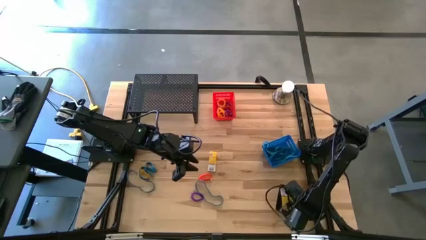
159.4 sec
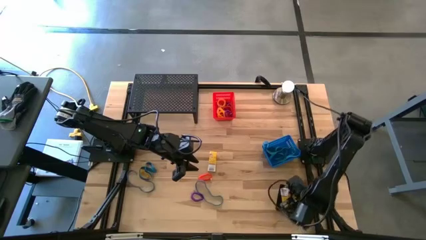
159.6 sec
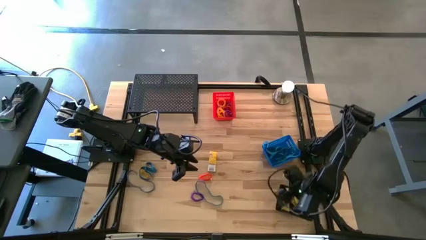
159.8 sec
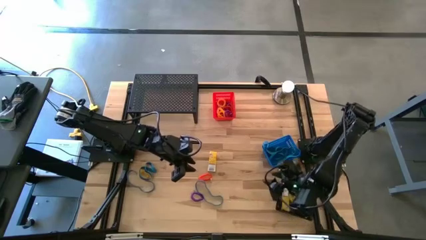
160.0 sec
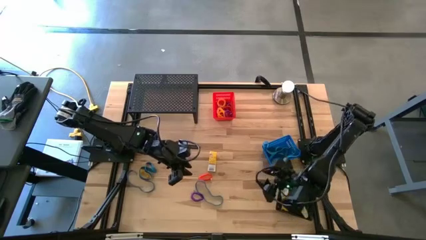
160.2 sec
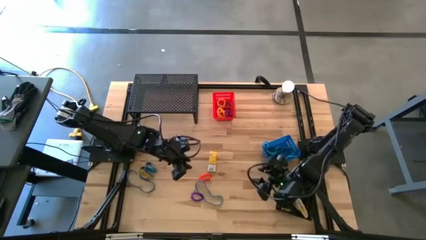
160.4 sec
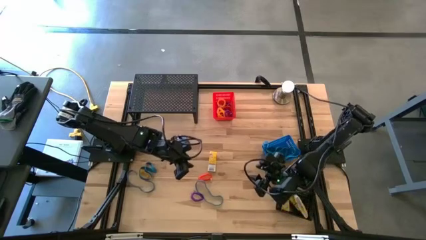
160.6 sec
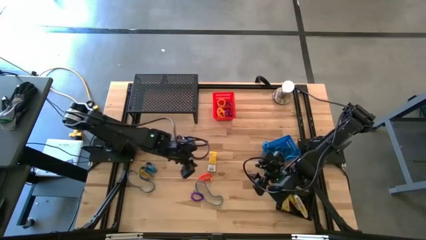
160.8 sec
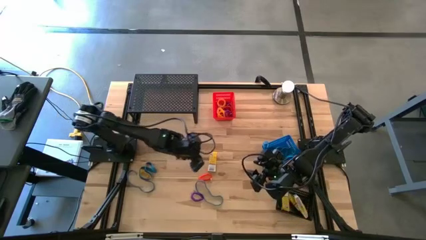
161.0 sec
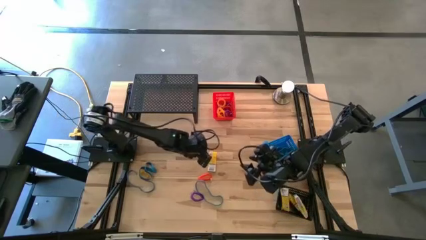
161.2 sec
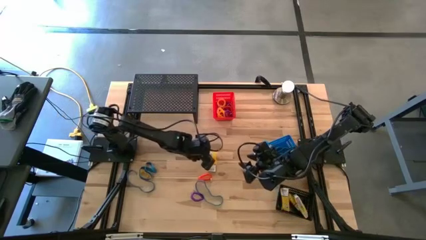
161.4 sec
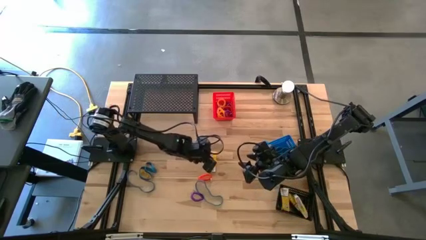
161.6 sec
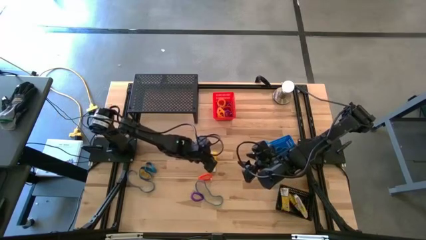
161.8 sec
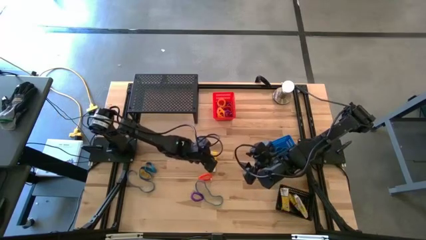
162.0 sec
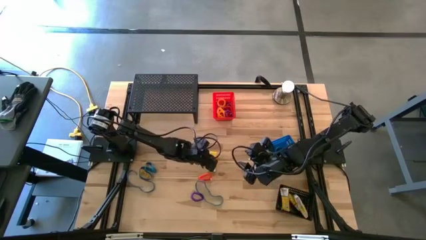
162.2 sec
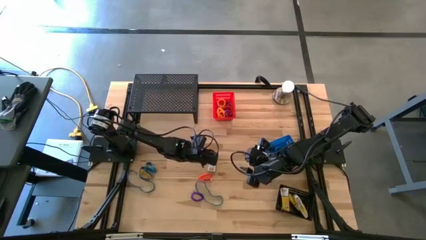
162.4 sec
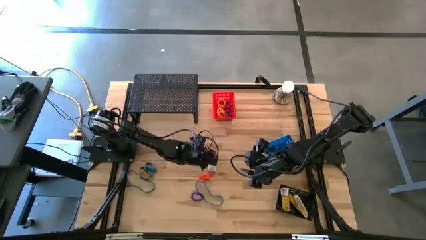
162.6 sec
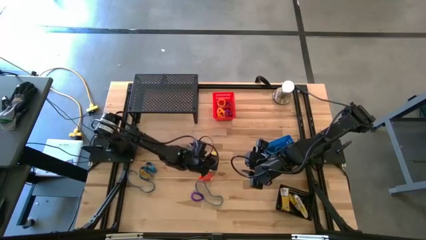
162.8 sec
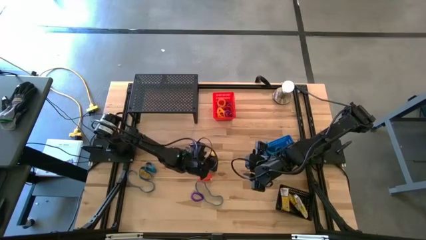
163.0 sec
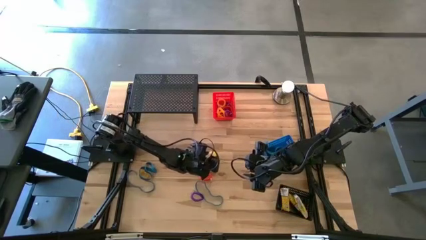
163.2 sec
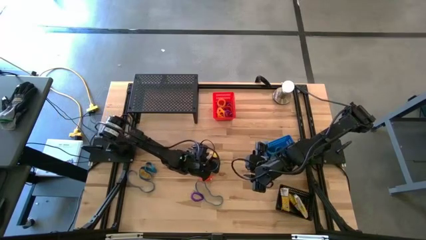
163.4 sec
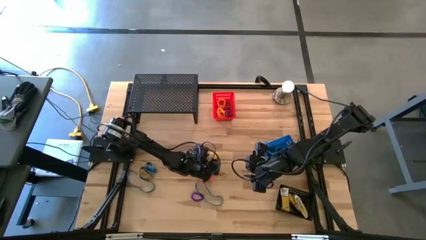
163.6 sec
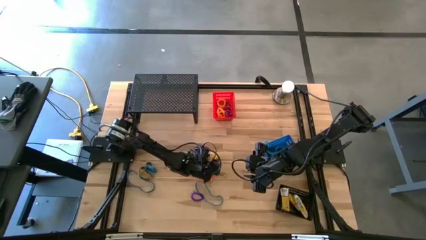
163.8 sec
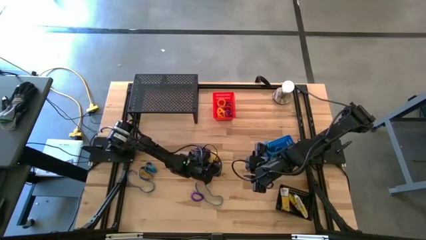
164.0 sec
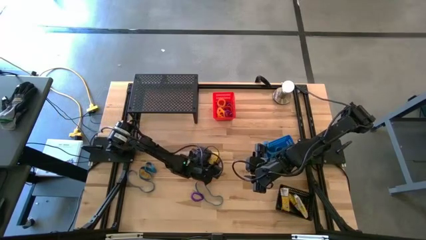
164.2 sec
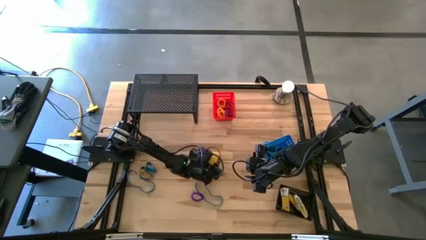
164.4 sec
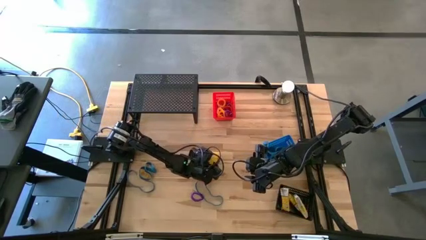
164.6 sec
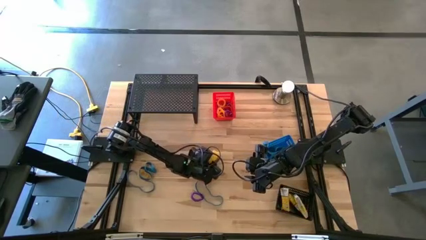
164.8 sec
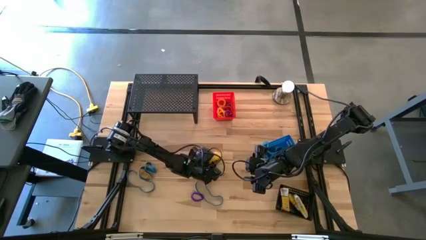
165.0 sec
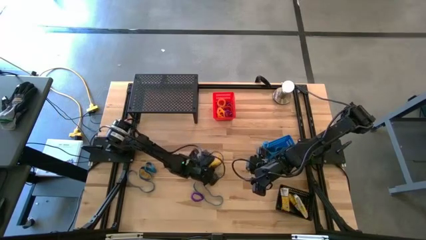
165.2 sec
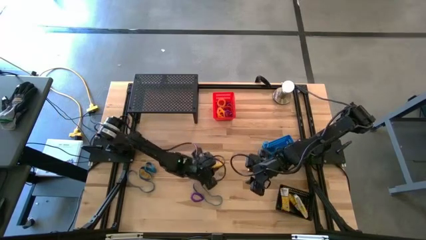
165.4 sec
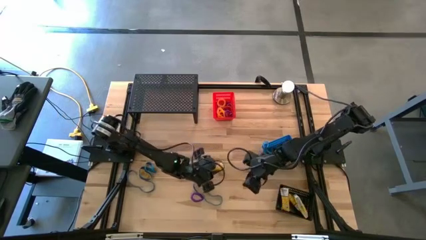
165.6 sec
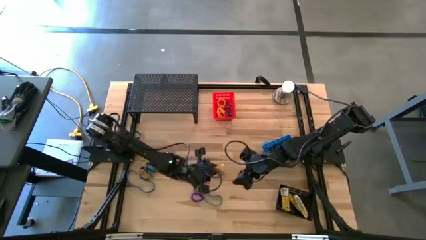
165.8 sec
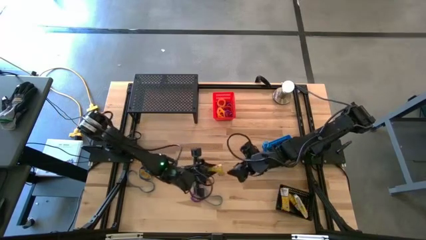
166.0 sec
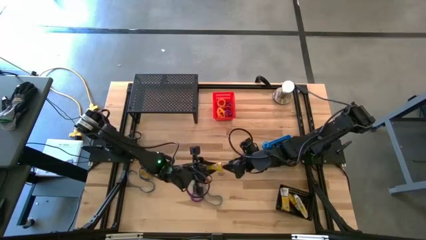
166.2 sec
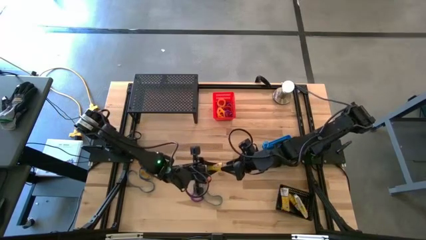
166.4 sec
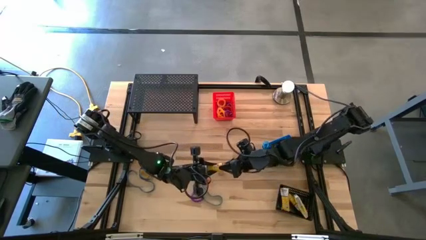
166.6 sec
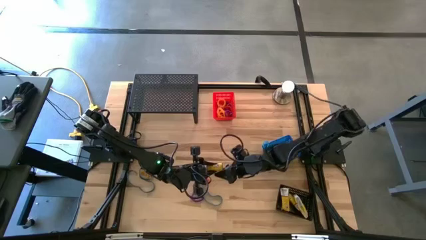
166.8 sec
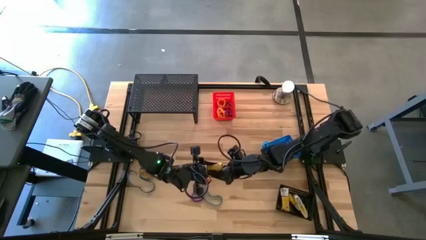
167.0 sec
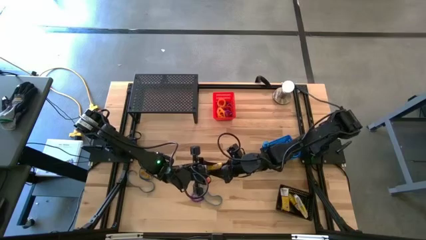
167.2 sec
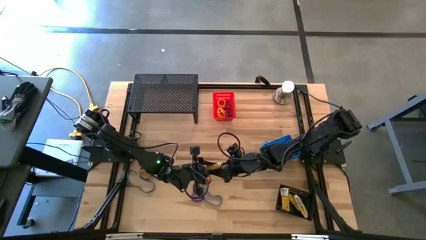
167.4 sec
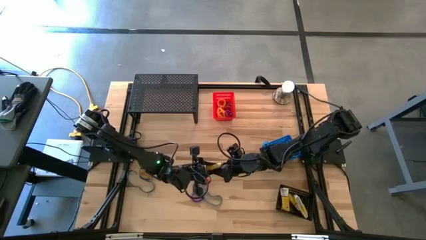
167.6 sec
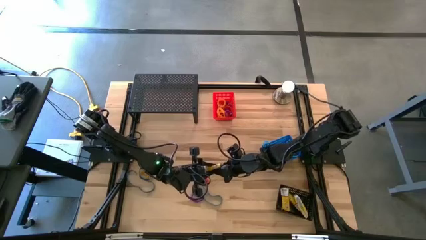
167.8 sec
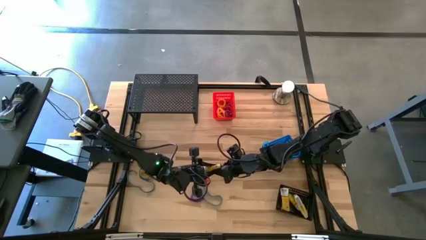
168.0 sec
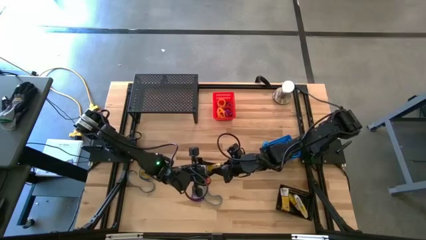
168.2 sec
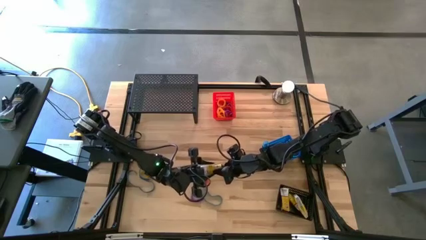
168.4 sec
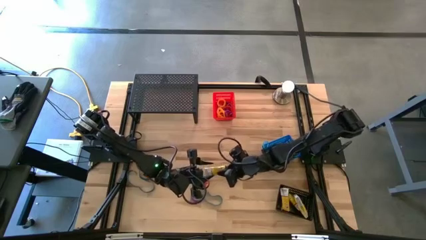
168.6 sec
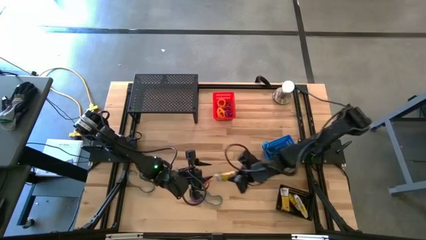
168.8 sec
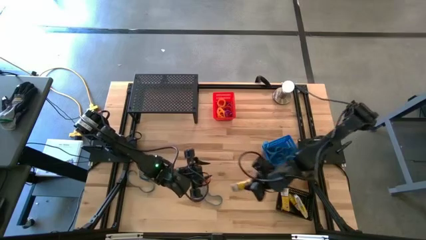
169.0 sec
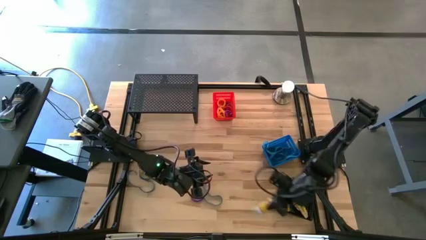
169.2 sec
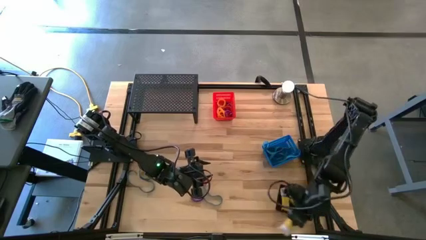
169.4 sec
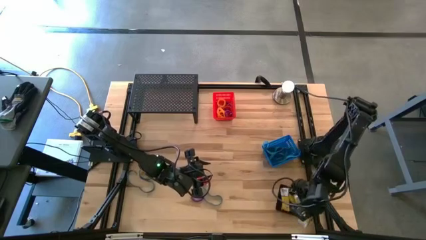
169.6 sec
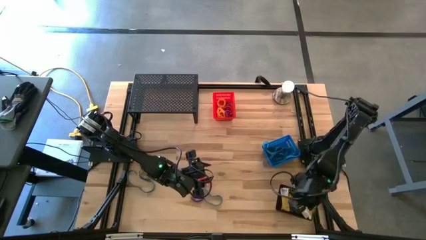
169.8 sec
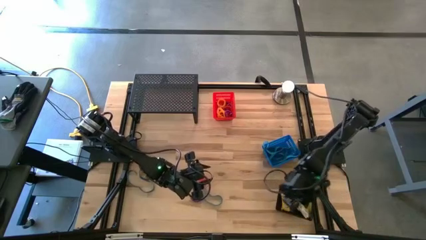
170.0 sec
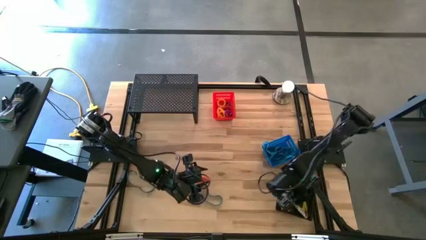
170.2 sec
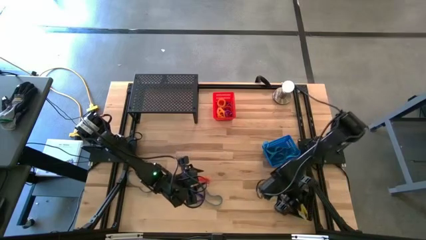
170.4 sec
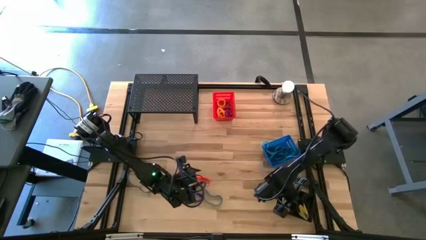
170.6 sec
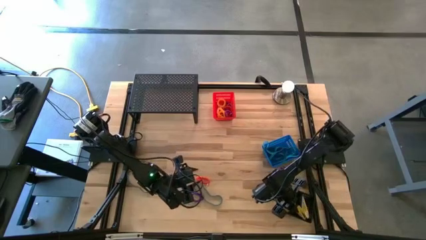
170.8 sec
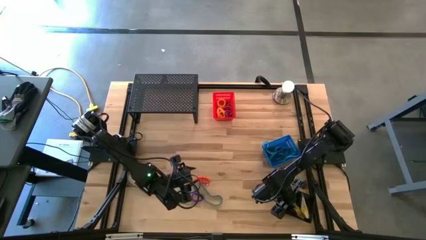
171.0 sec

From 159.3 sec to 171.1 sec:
Task: Pick & Place Office Desk Supplies
Put the crayon box into the black bin

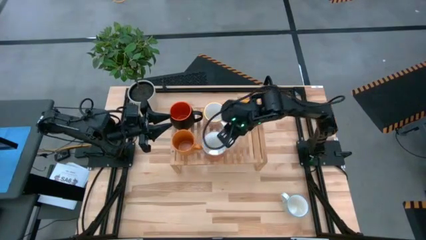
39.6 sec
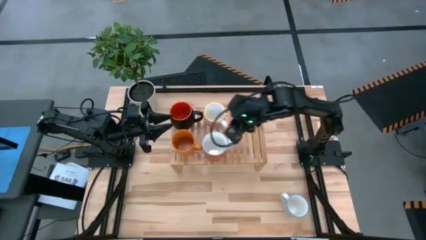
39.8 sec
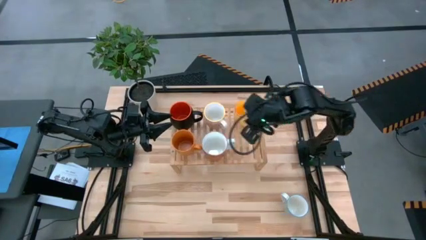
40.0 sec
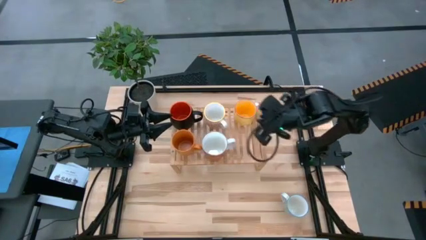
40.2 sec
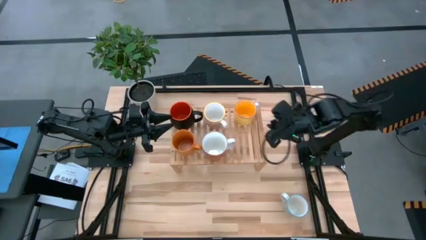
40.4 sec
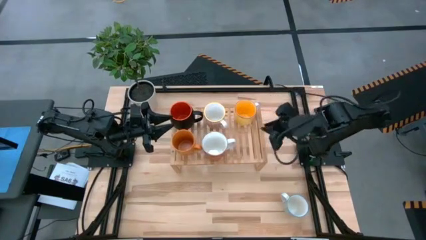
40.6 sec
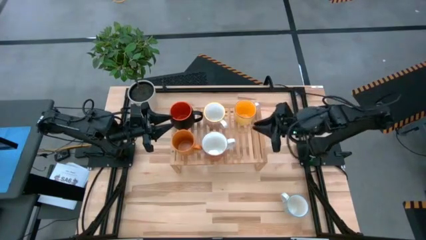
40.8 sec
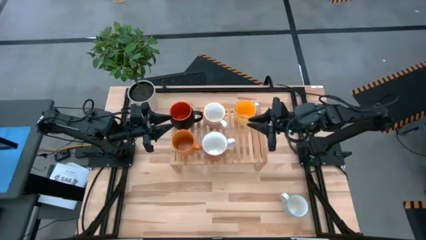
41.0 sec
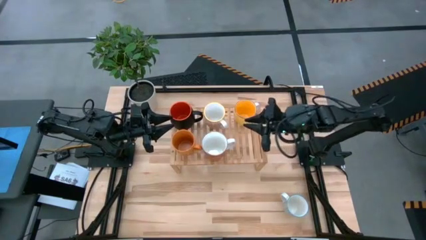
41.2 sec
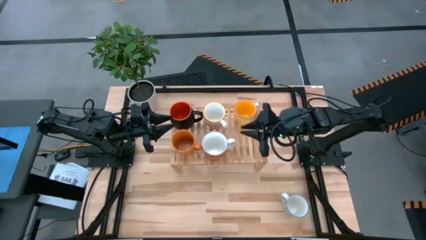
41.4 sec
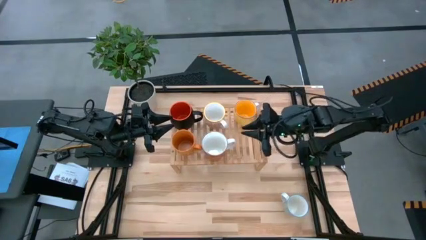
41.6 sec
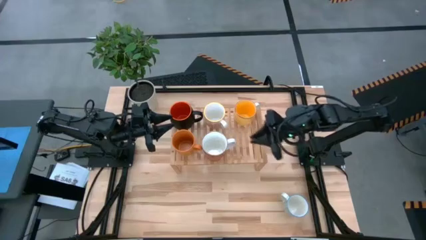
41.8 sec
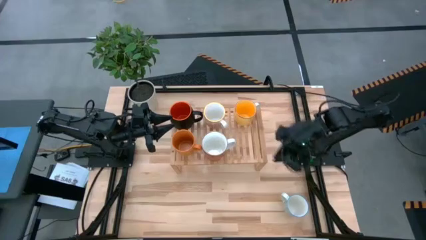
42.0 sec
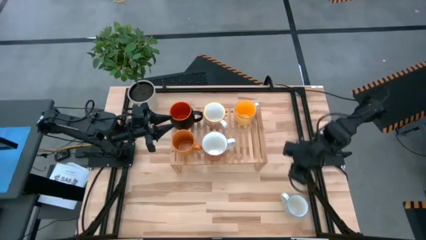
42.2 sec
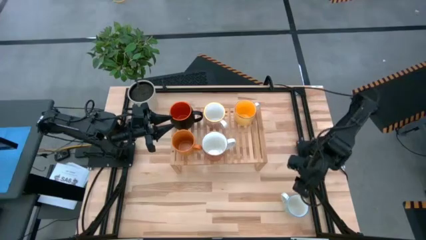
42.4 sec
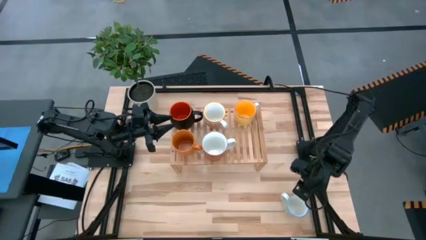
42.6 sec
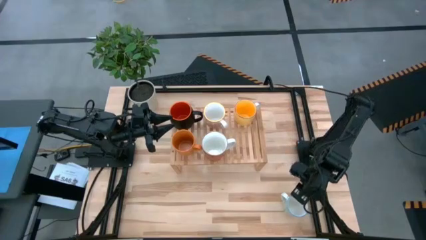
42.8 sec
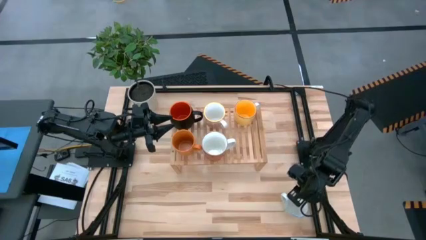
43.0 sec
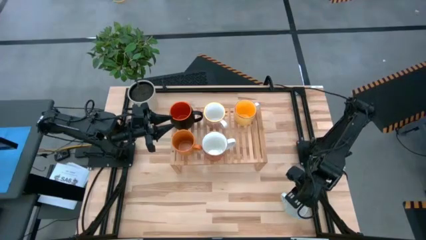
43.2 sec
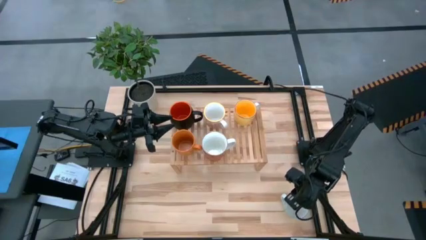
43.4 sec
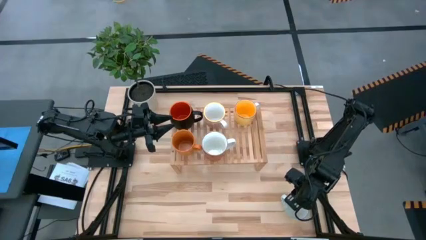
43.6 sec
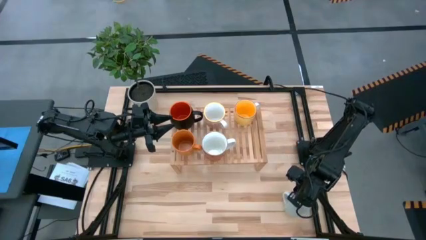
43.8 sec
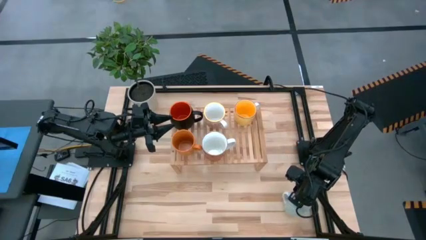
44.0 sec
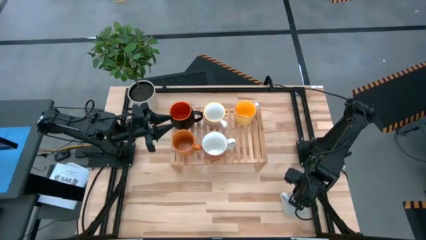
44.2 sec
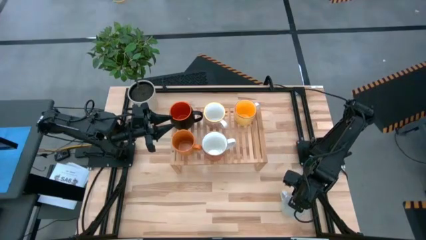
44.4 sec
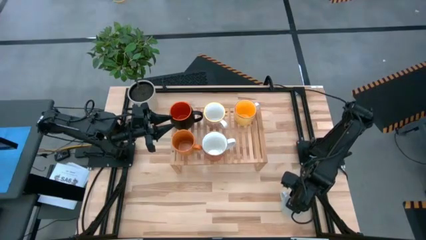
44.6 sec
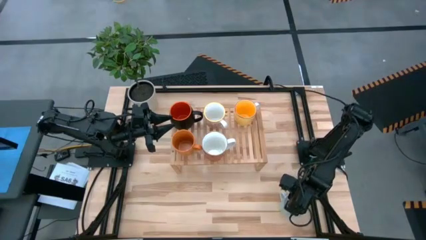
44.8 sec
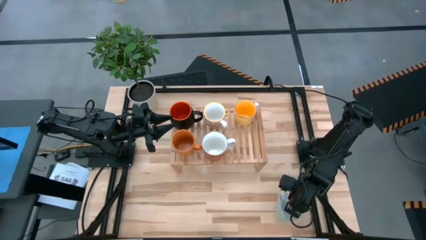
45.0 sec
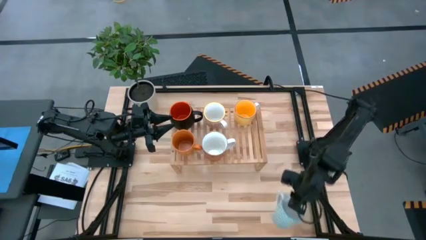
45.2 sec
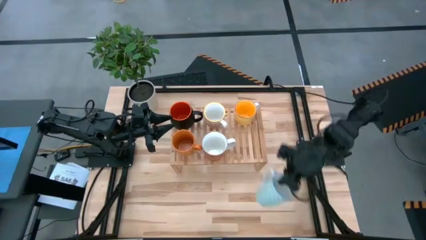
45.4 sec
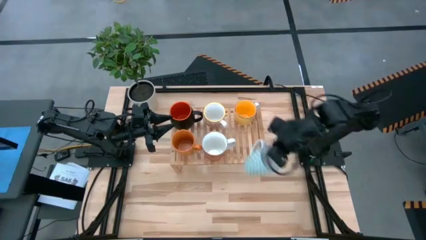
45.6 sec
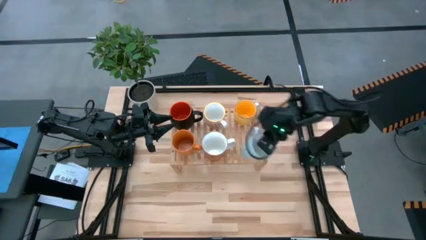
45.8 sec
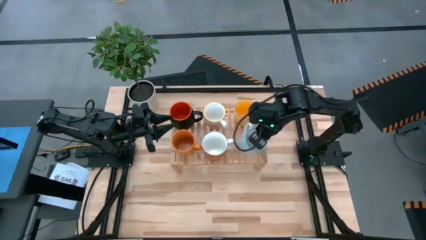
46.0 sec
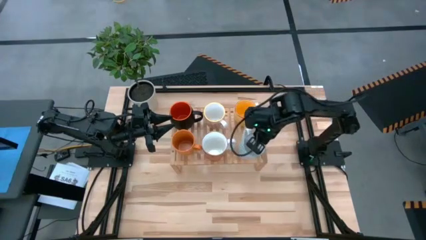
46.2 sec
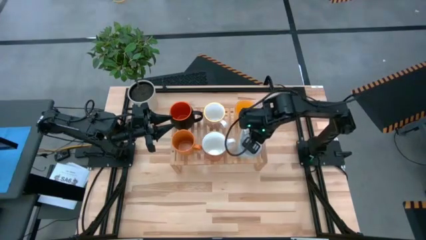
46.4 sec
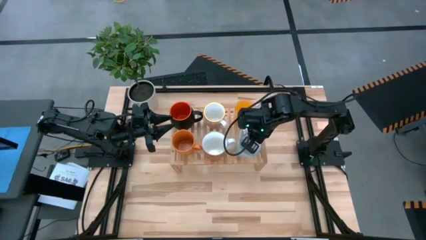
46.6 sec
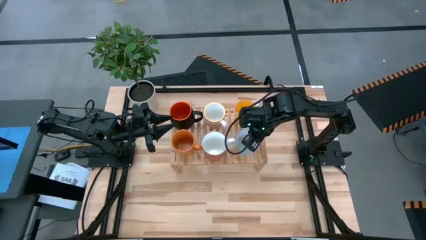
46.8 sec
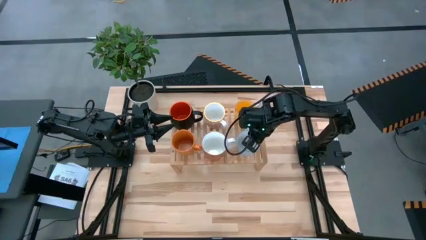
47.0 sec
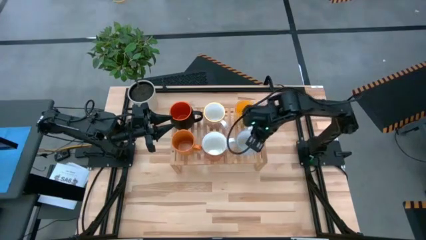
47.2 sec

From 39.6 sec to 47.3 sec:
Task: Place coffee mugs
Put the white and blue mug on the shelf
